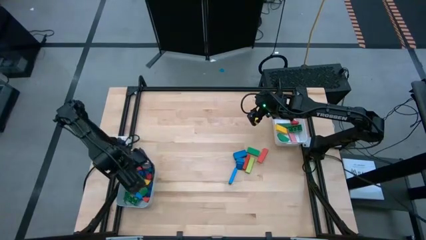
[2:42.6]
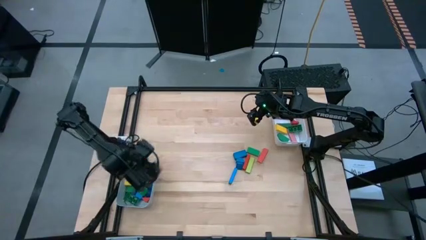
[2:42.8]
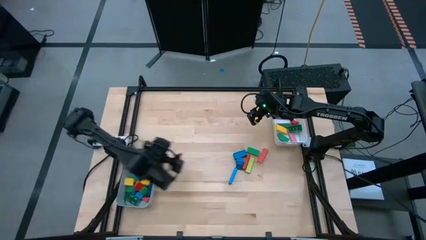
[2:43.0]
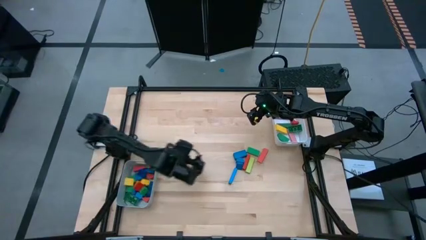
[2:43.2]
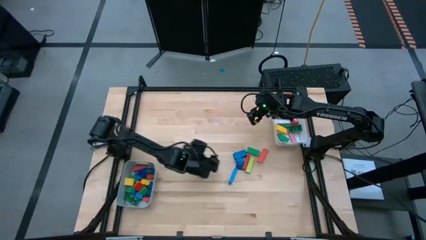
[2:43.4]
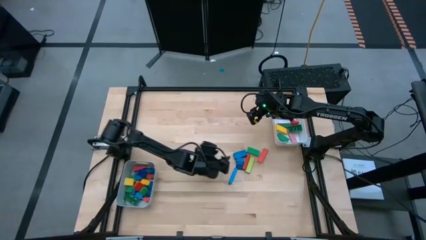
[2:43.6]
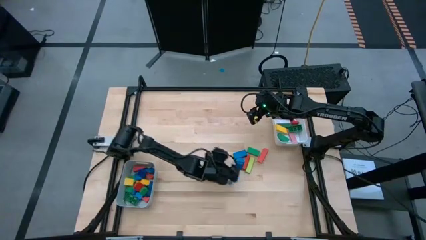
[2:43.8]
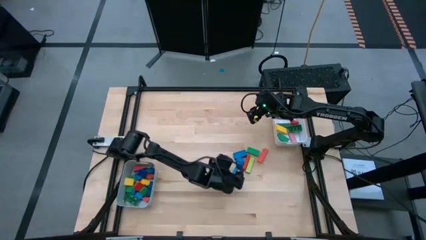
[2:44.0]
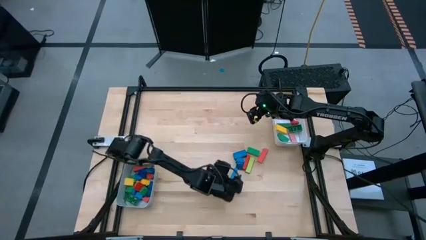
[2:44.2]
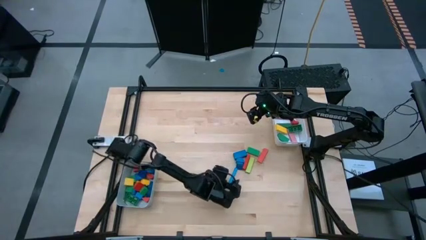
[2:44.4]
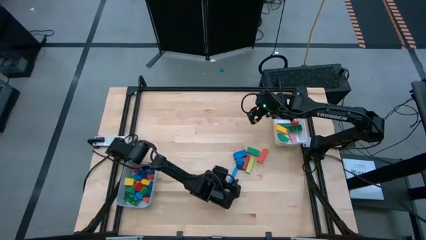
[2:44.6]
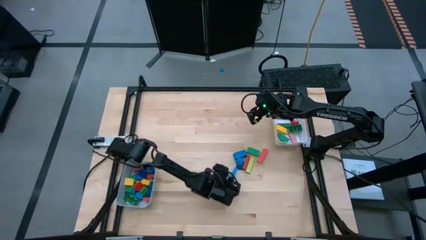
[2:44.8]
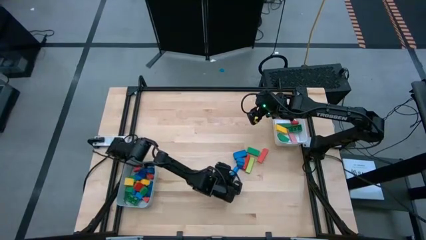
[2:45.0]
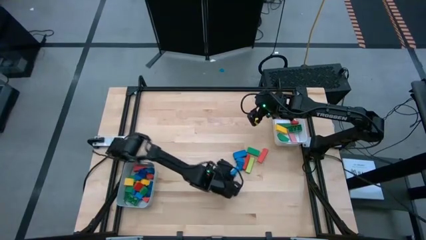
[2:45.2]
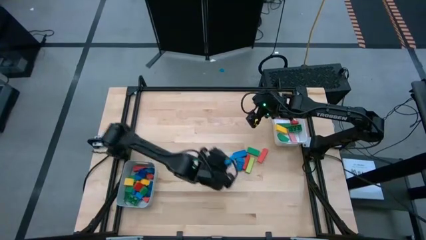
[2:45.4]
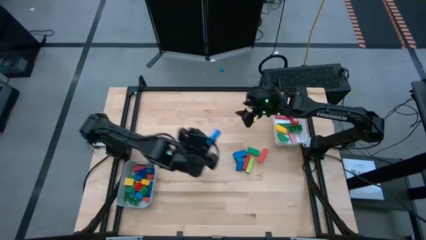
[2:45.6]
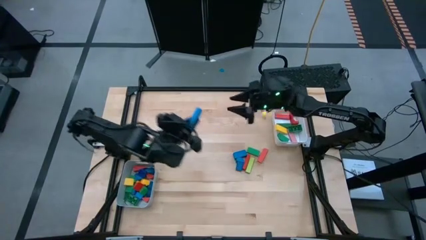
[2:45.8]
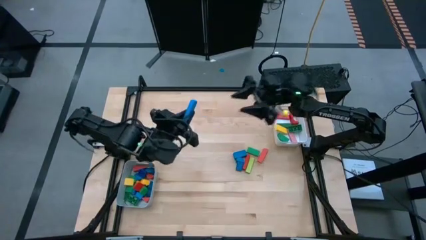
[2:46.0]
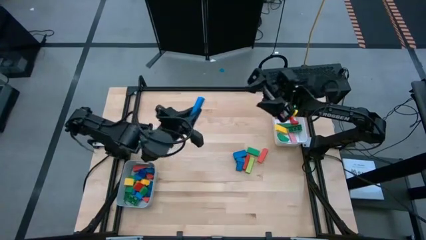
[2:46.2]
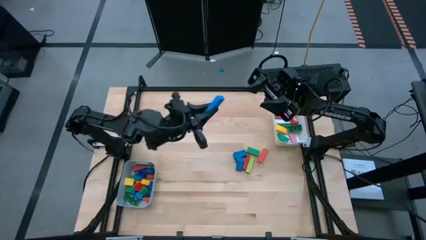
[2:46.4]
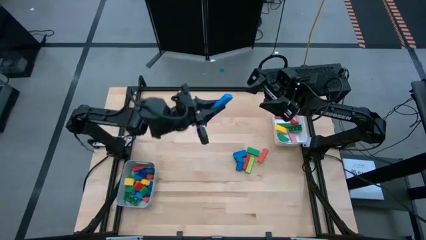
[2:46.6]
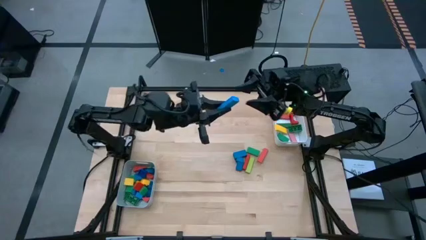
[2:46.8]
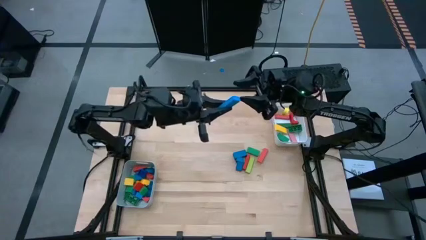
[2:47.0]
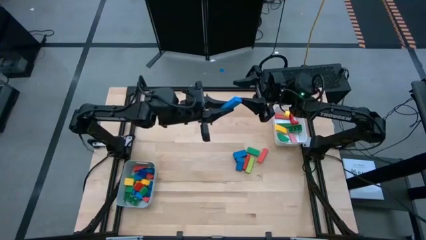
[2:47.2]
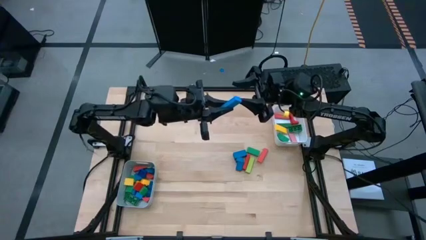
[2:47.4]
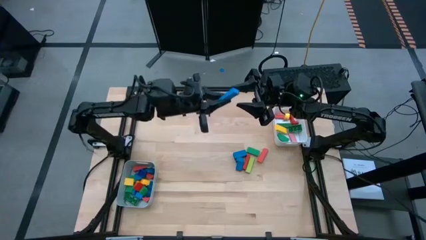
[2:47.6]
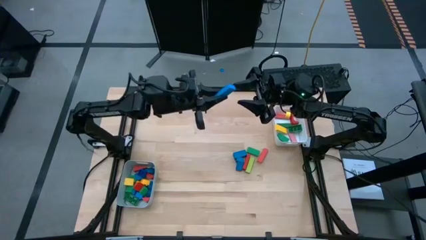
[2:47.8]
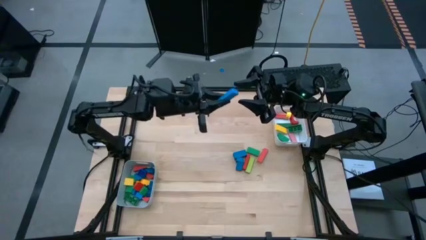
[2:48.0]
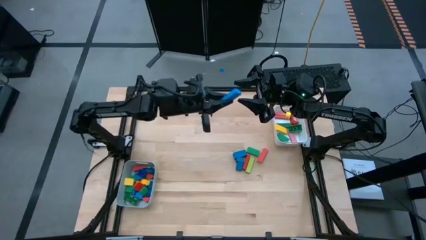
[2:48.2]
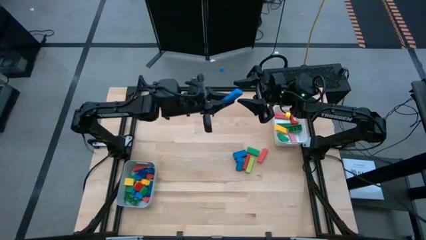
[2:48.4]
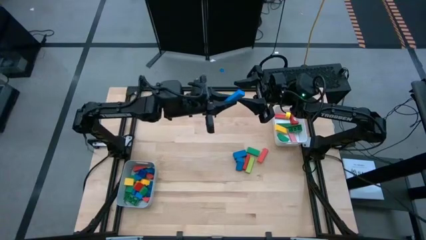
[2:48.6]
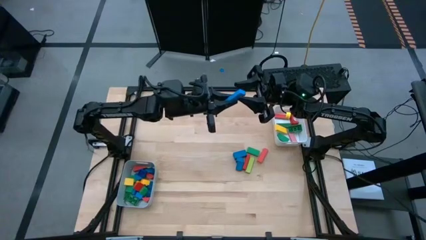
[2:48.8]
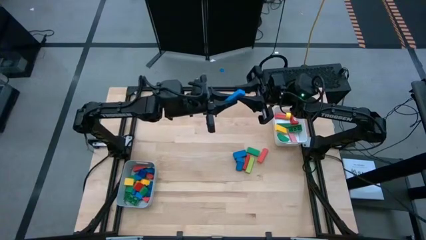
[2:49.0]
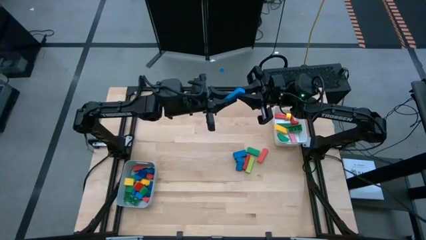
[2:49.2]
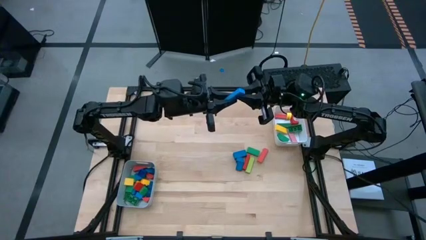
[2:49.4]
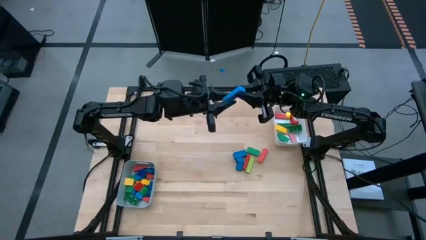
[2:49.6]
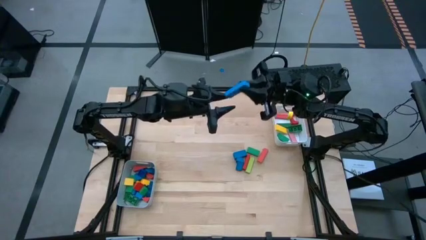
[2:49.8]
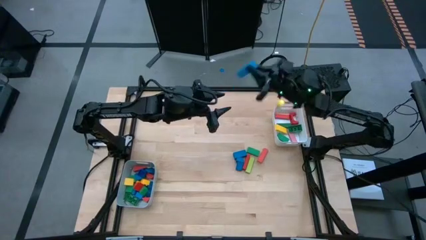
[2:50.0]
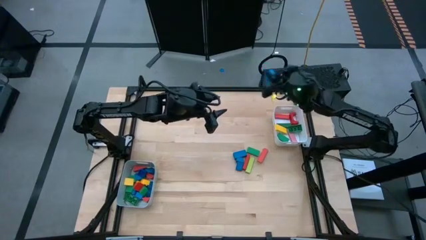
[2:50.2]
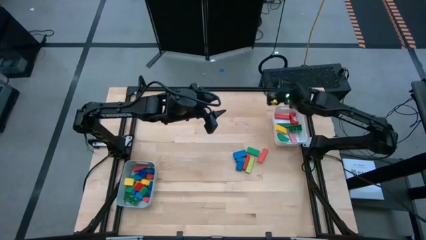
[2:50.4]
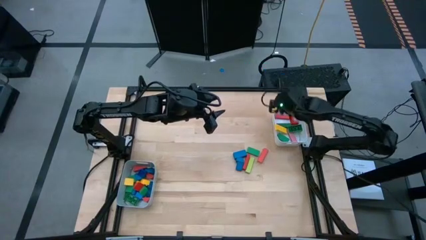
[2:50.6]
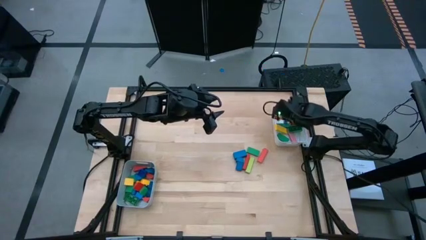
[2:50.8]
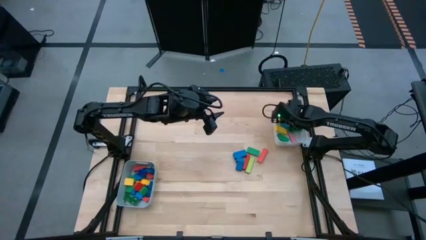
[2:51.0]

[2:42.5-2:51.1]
Task: Sort blocks by size
Put the blue block into the white bin

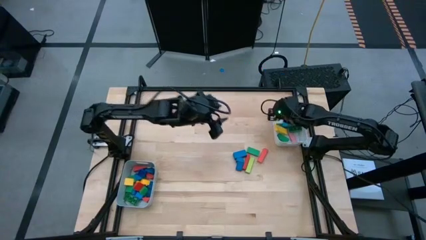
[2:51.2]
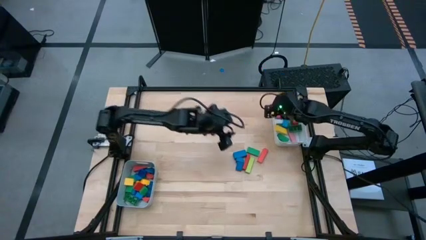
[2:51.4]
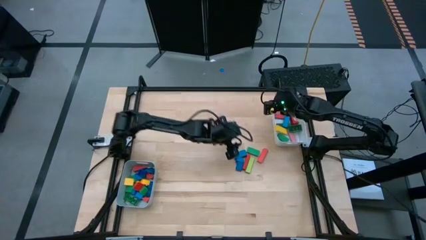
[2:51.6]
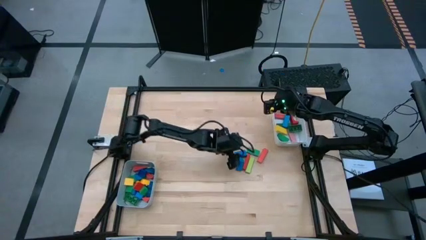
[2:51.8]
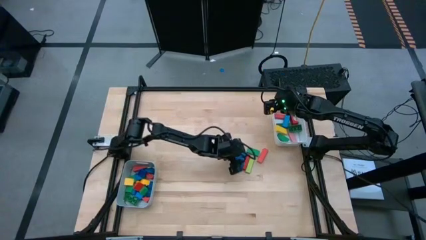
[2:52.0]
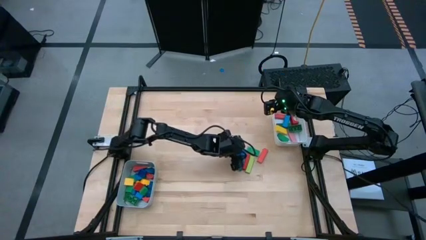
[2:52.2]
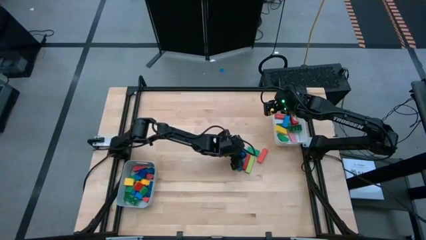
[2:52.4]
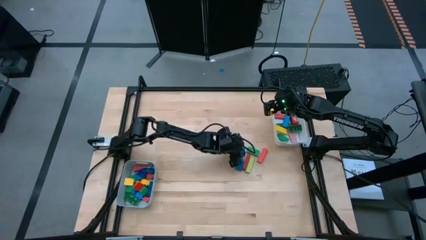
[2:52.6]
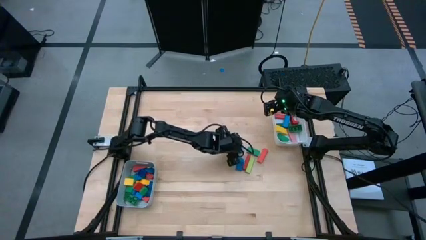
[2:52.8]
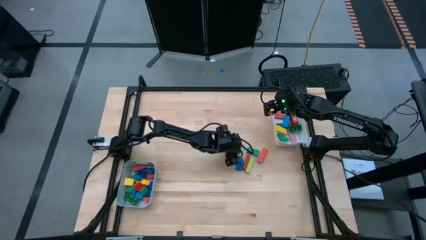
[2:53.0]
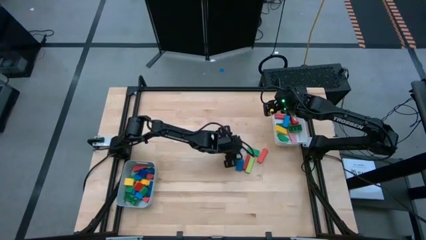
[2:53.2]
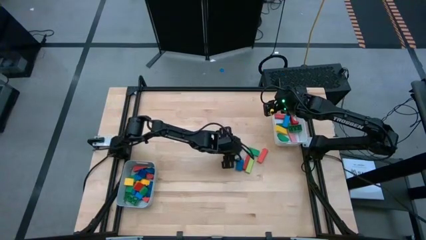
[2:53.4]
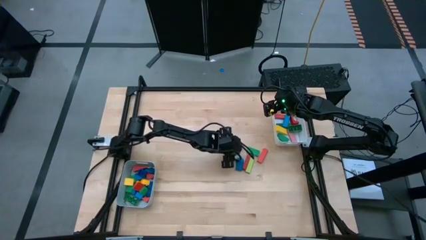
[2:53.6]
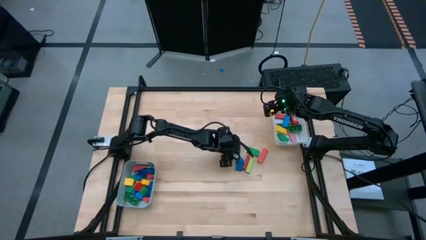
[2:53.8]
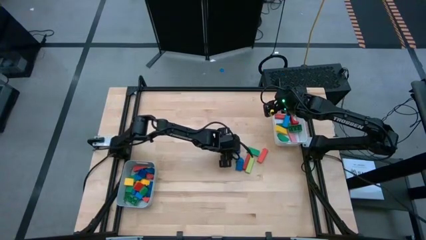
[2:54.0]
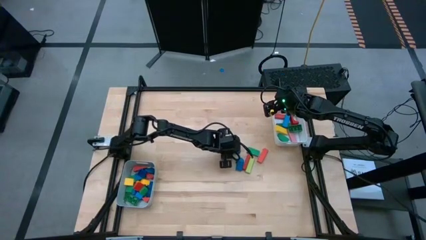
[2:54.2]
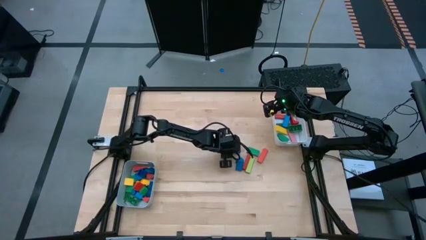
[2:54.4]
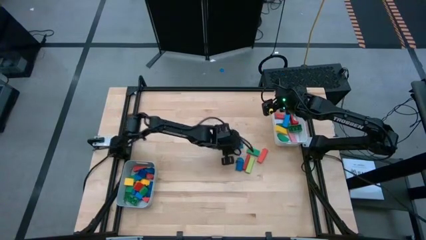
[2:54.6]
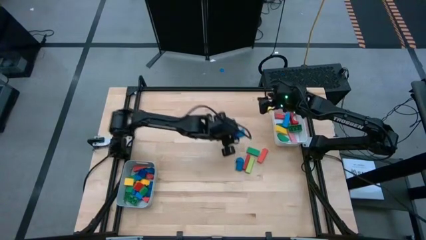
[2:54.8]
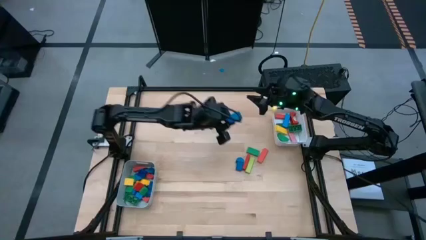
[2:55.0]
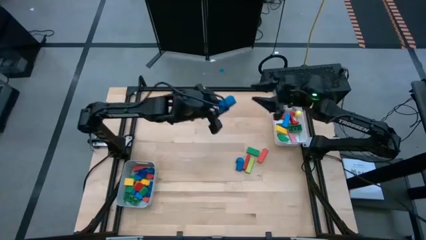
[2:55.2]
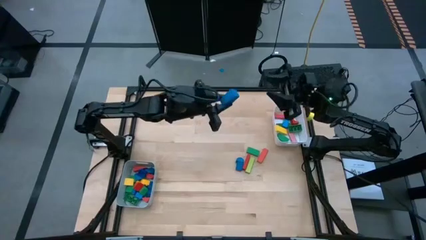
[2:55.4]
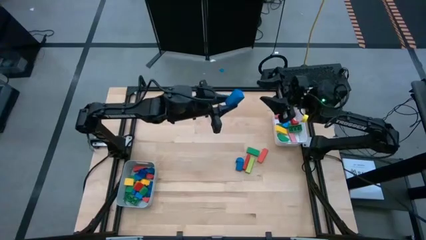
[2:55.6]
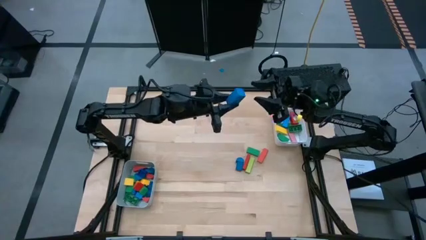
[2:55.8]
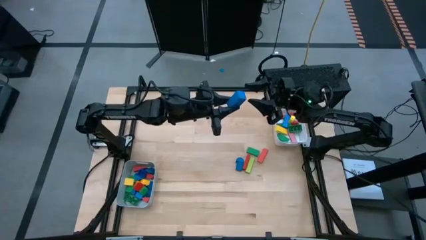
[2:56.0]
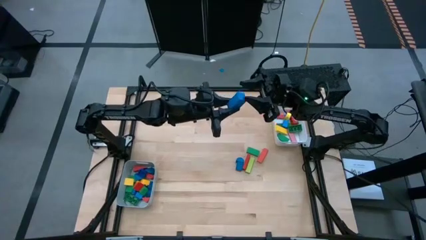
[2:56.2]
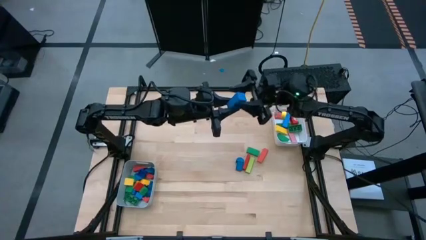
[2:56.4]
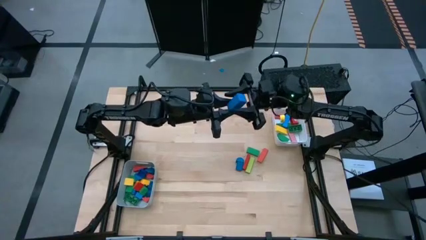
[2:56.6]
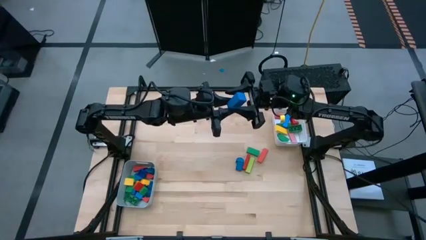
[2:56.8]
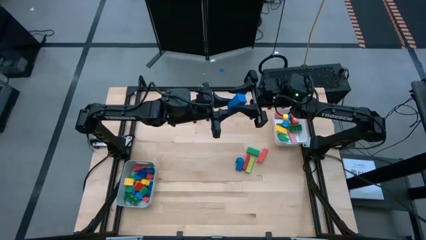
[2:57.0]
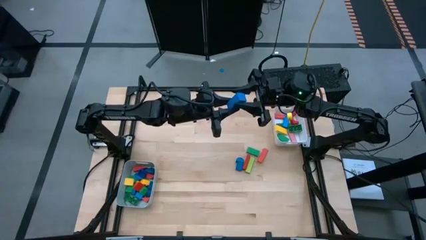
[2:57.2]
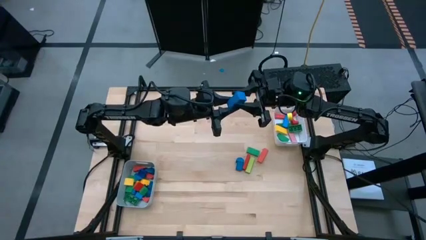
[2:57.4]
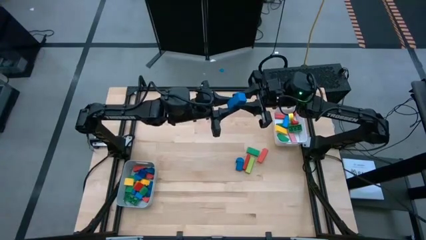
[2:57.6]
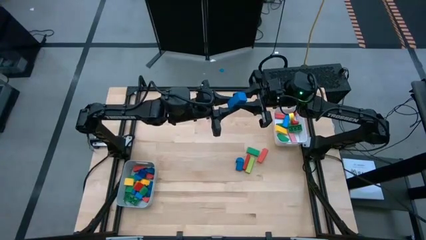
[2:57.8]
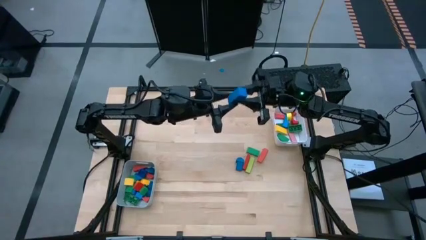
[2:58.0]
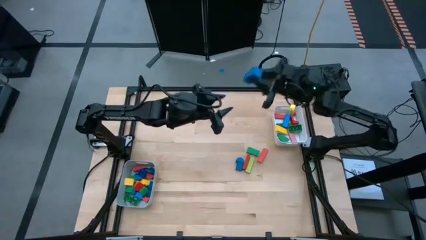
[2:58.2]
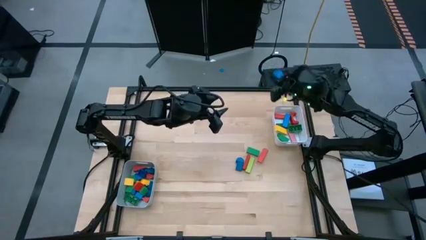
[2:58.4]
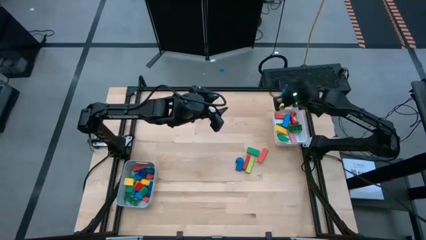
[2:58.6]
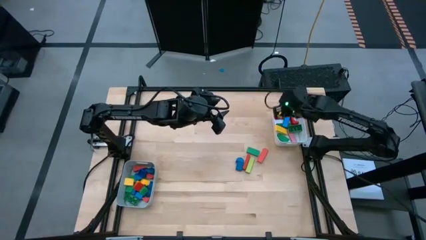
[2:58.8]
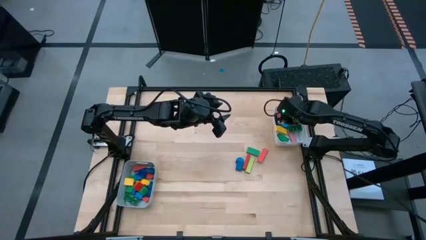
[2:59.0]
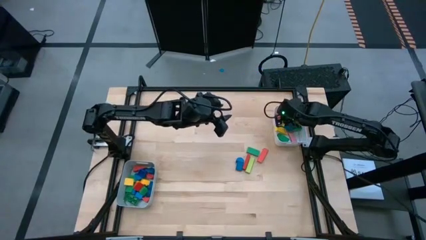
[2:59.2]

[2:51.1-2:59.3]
Put the blue block into the white bin
